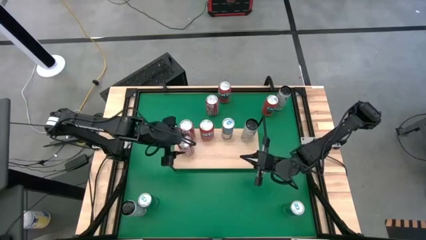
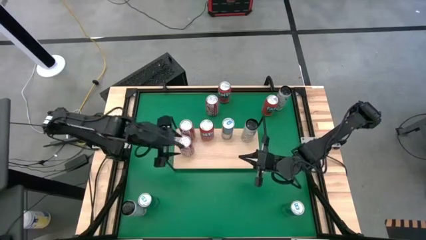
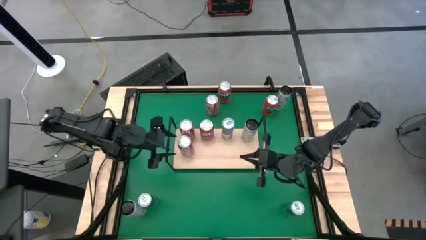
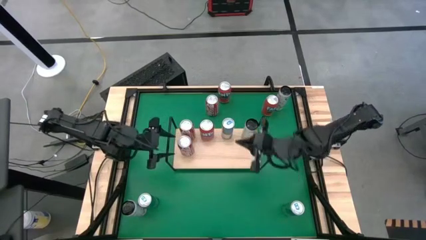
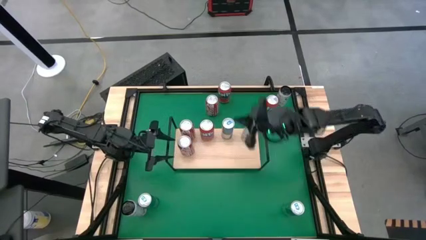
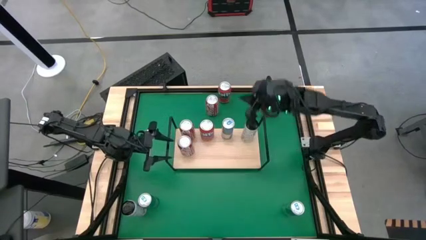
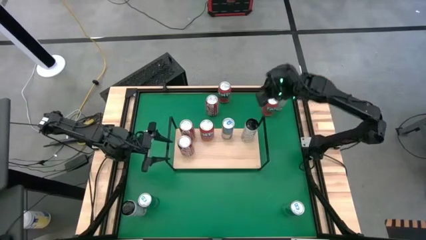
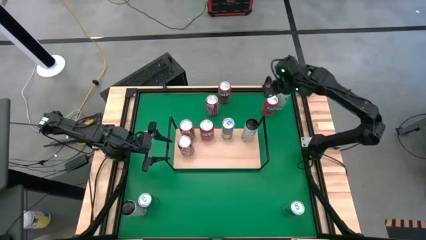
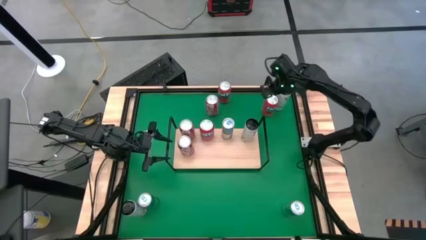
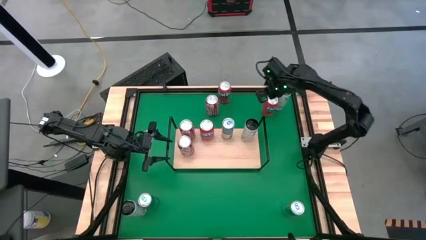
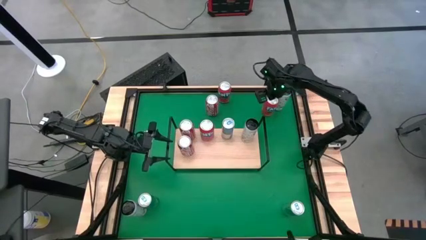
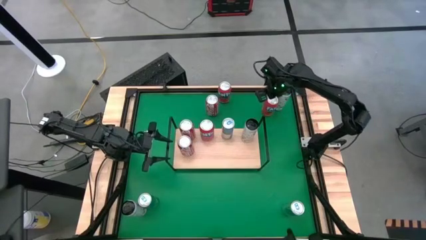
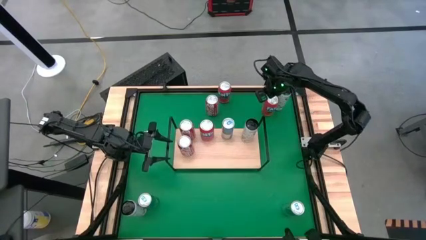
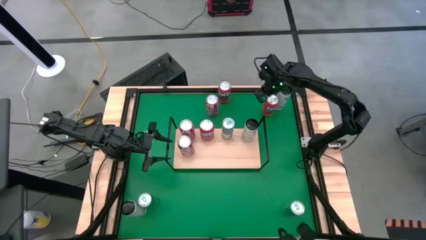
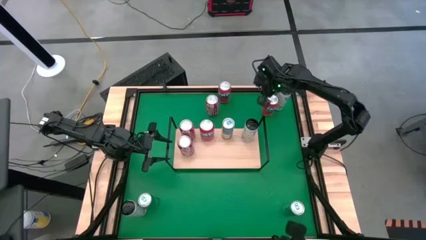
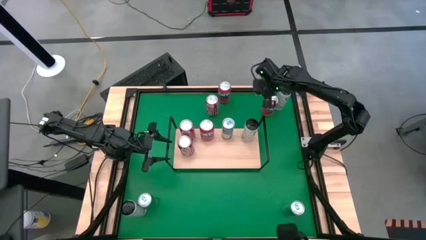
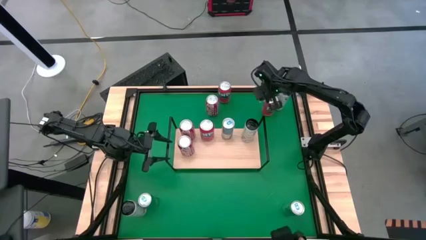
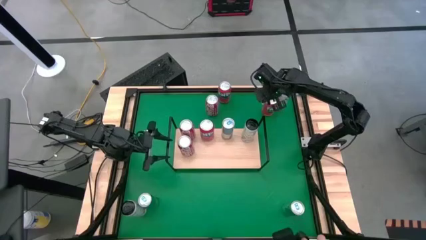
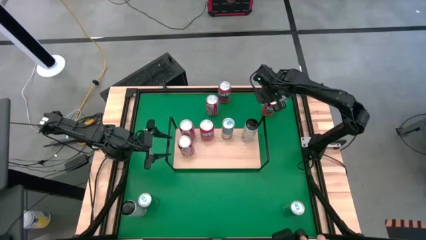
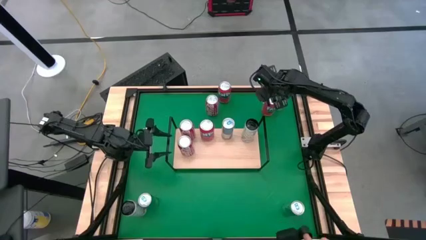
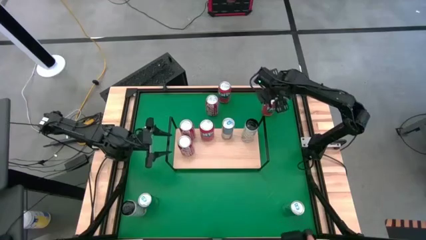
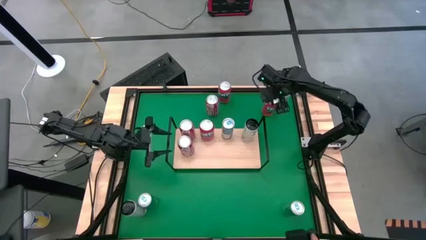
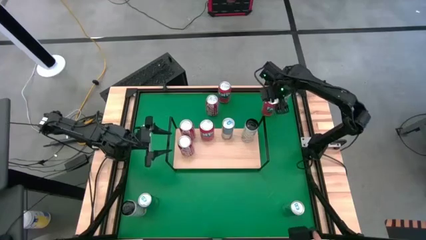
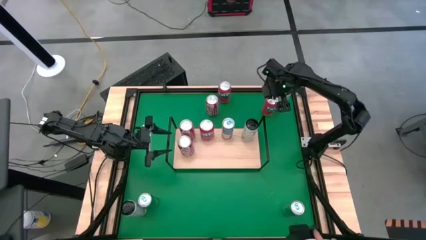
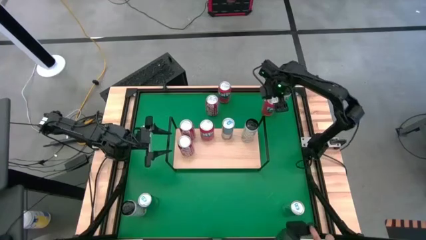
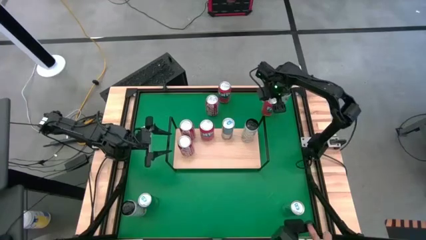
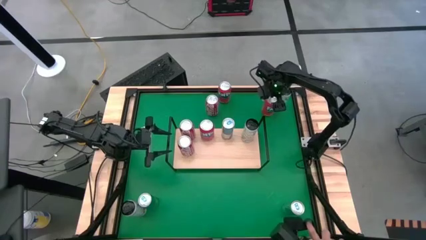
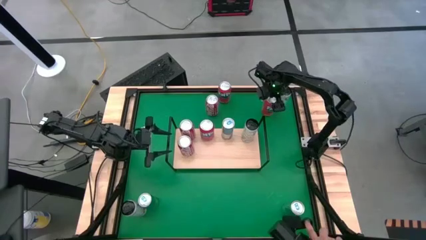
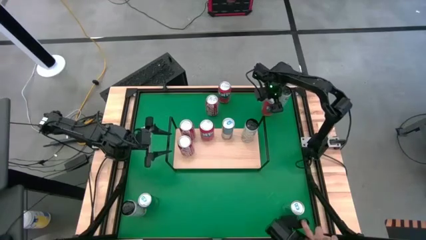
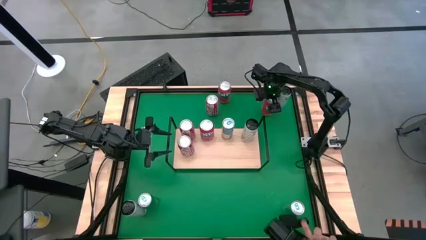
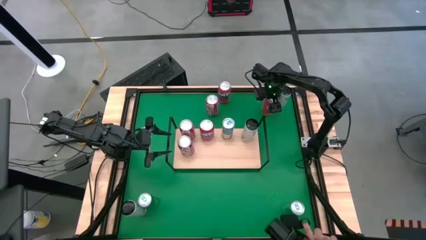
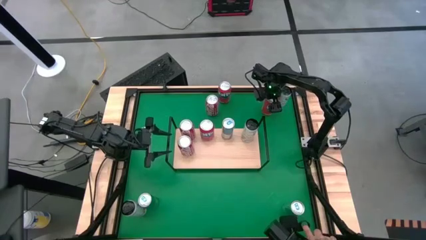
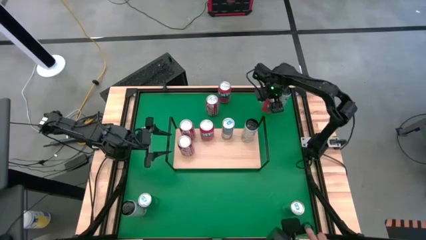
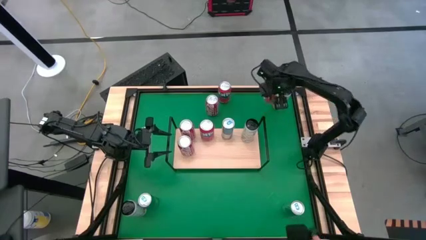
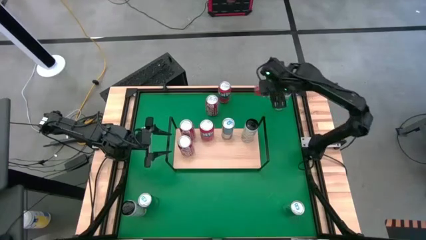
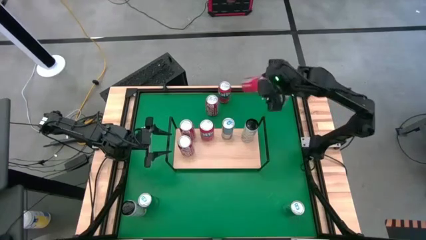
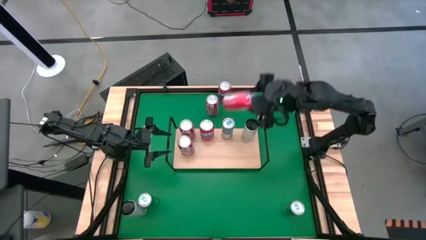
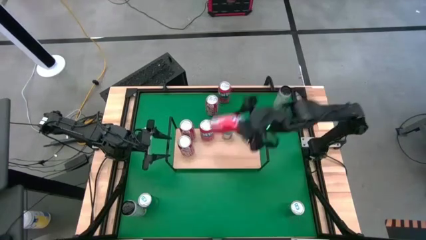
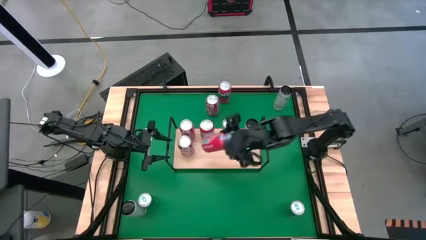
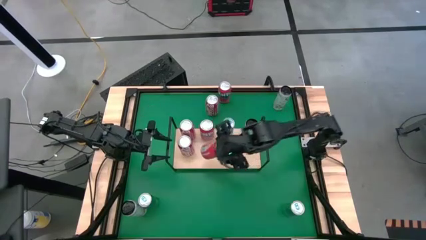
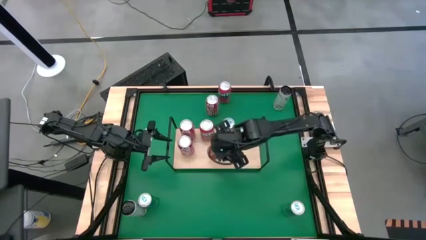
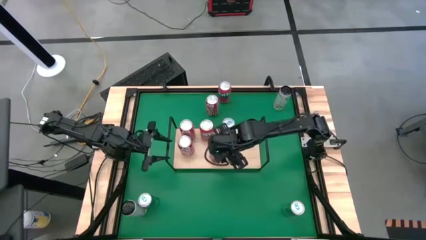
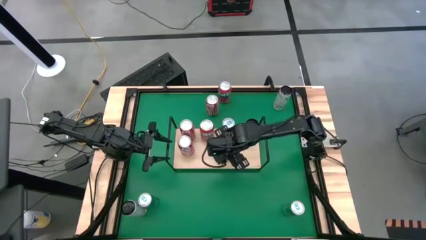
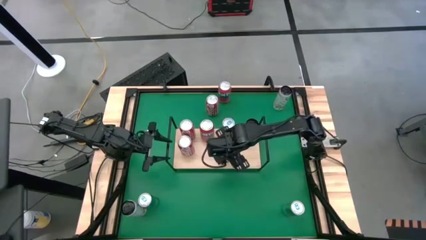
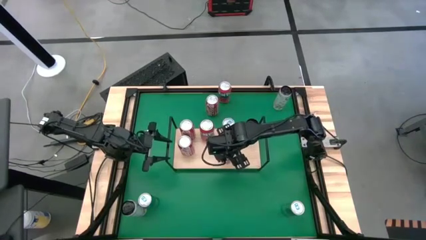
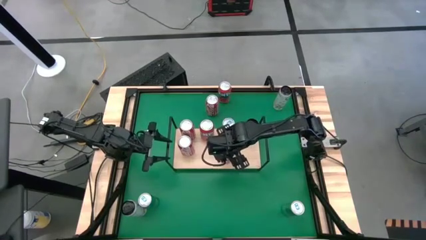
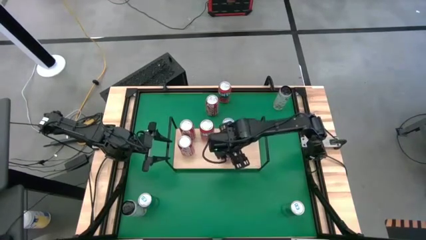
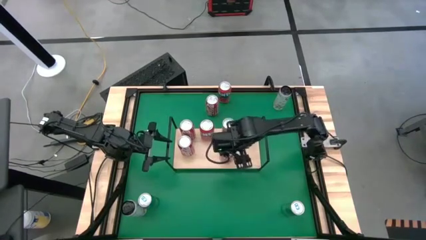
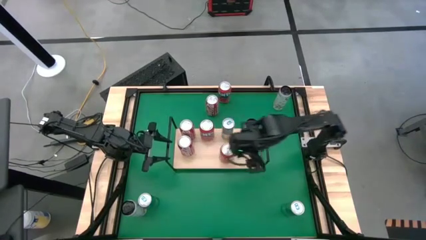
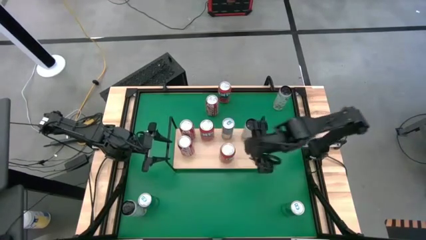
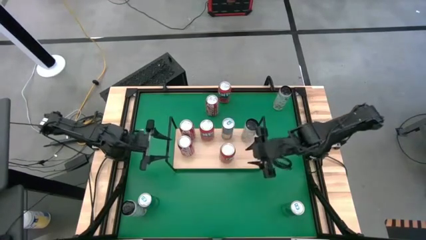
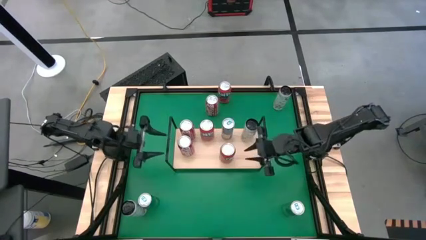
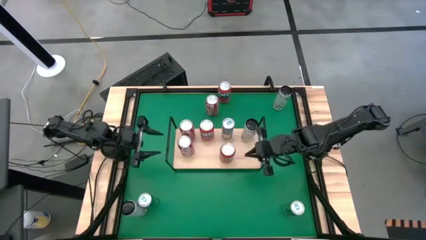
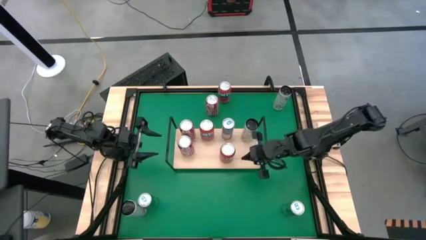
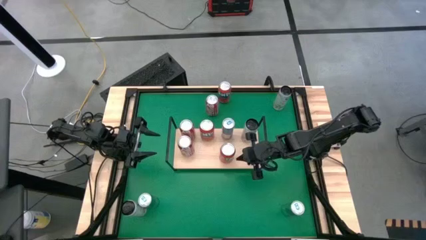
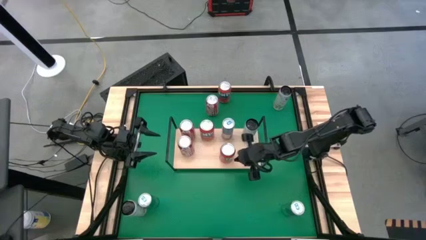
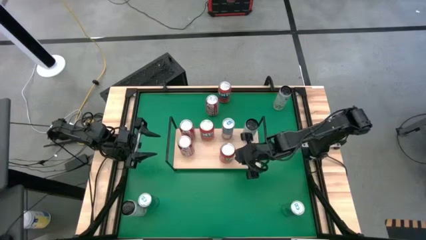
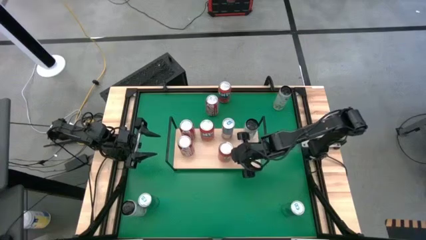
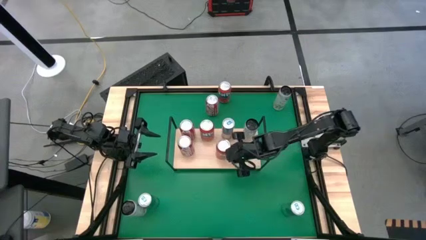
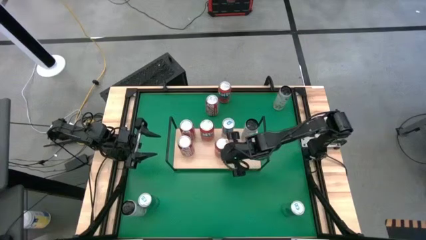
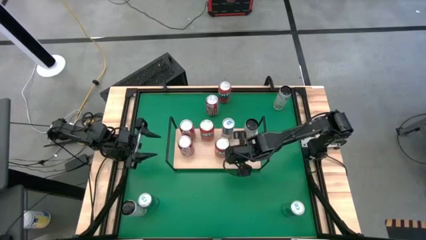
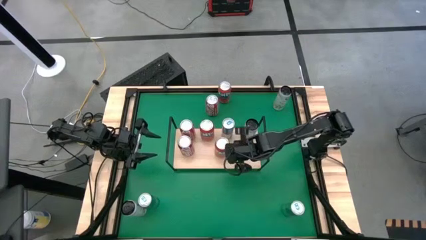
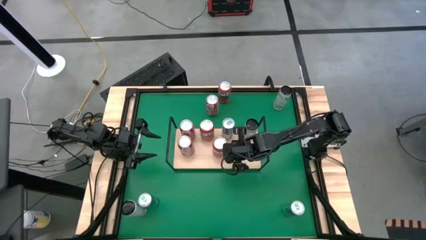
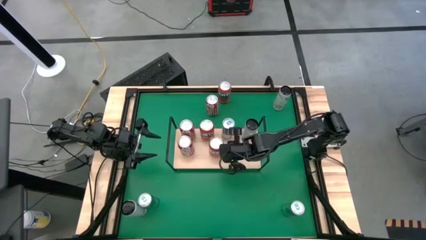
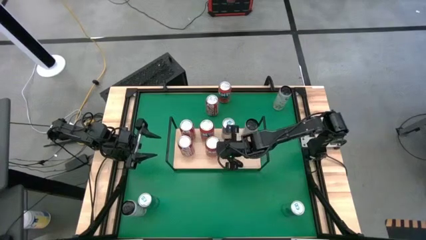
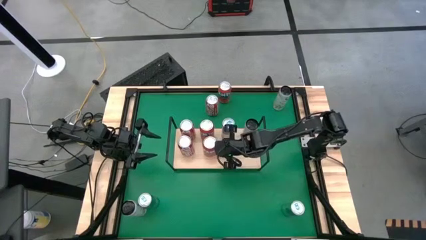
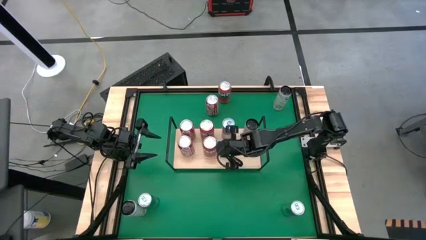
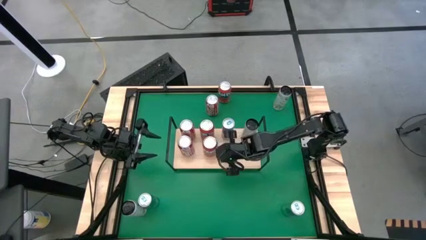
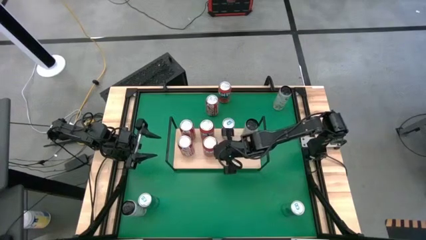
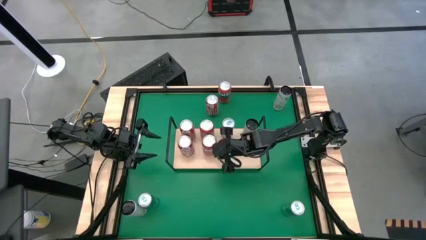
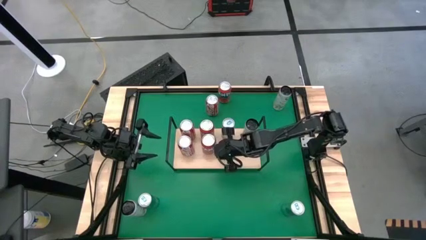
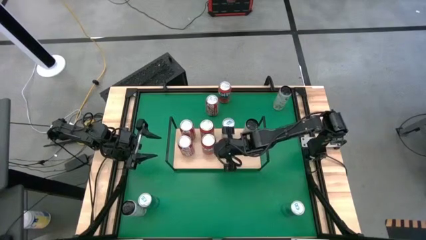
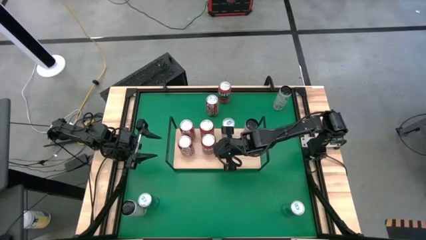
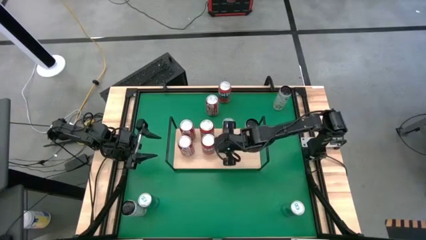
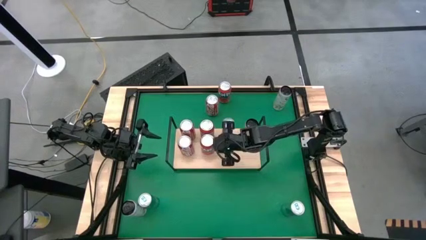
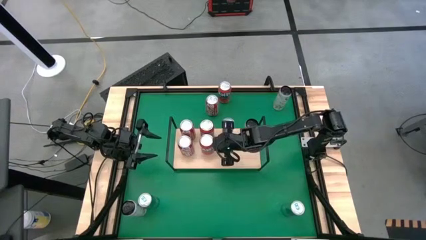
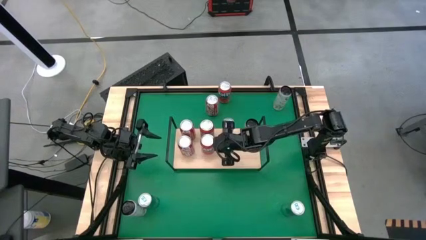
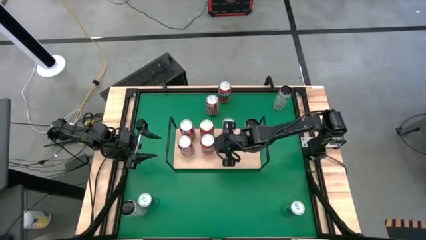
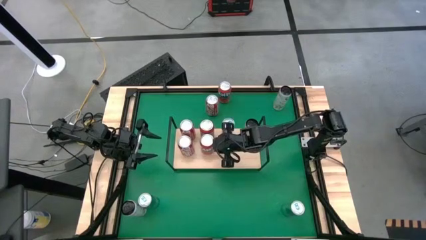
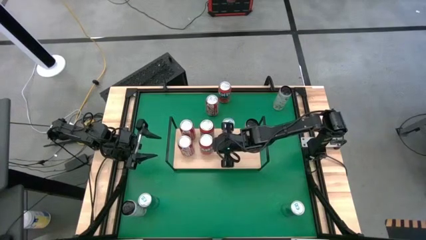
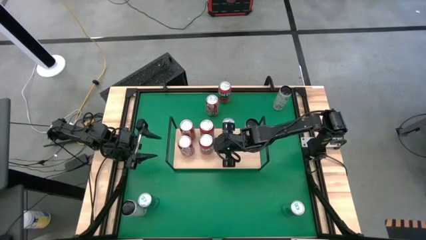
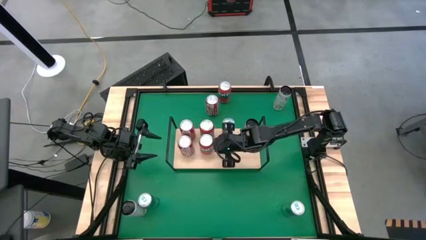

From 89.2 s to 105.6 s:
Task: Place canned beverage on shelf
Put the right orange soda can on the shelf aligned with the other orange soda can
